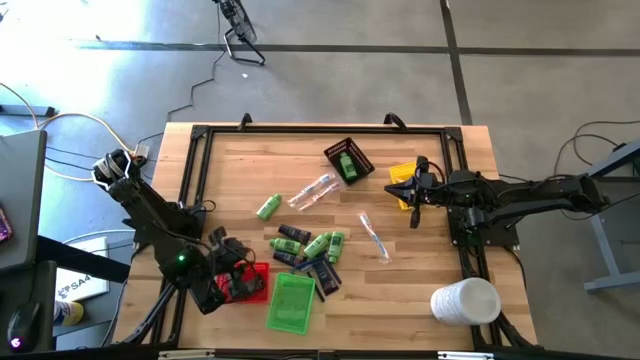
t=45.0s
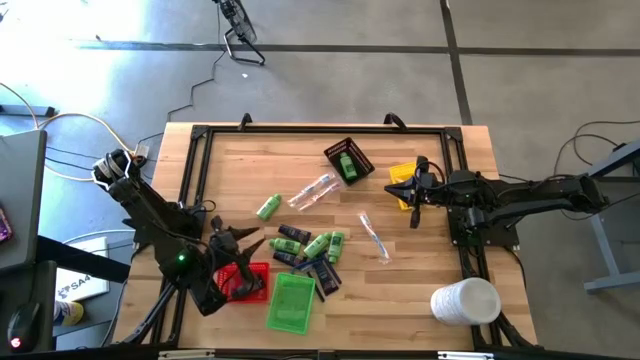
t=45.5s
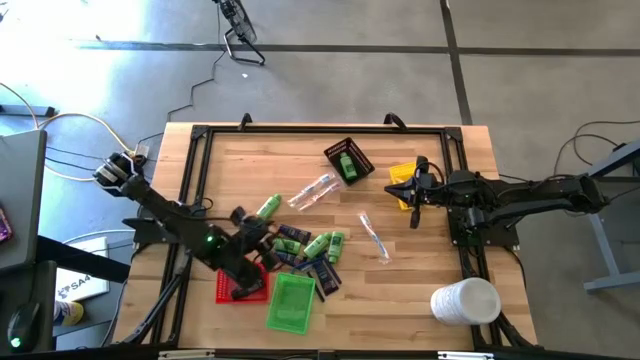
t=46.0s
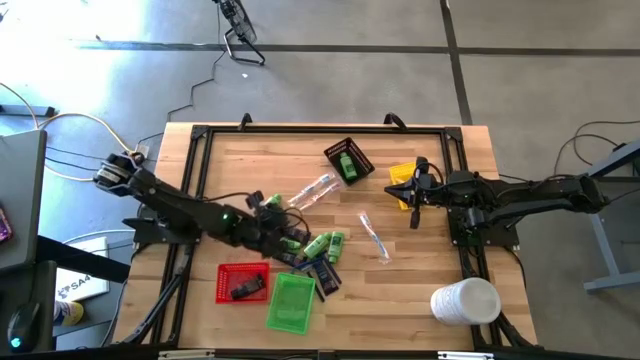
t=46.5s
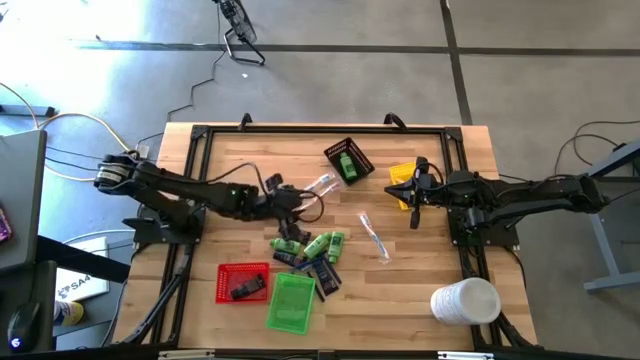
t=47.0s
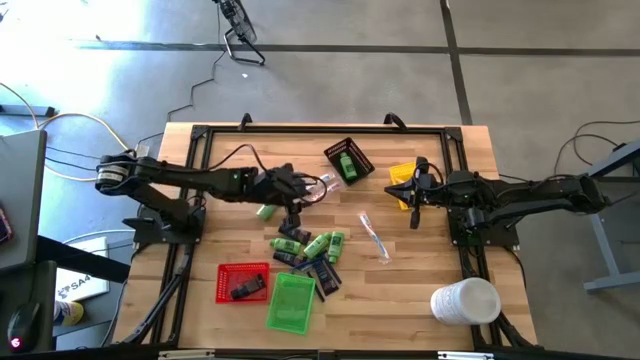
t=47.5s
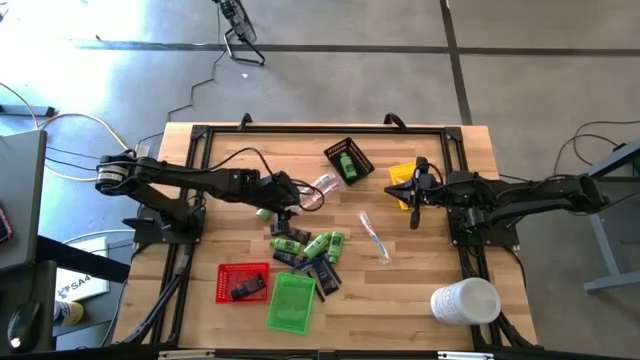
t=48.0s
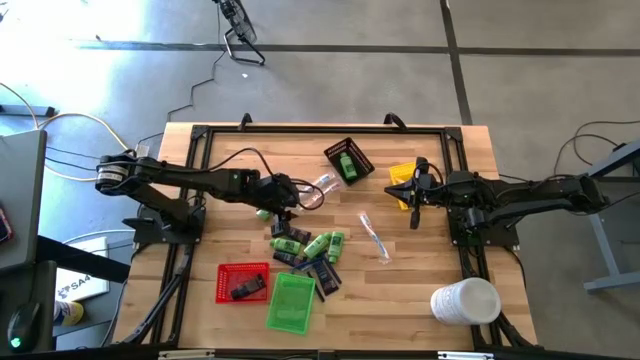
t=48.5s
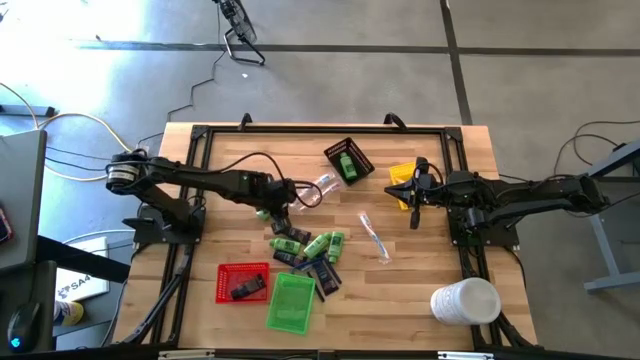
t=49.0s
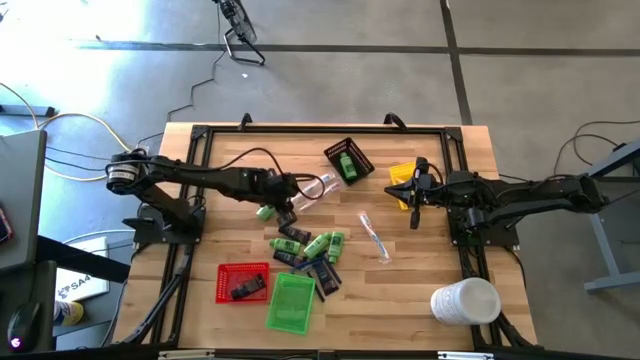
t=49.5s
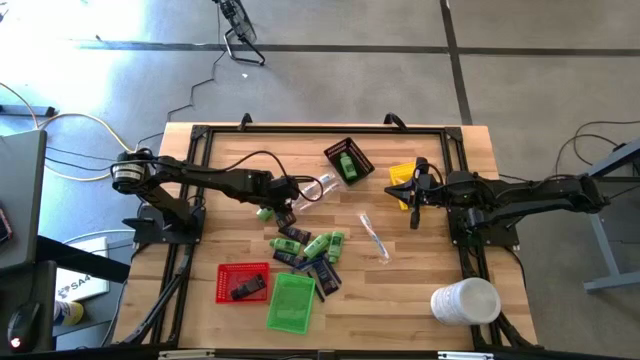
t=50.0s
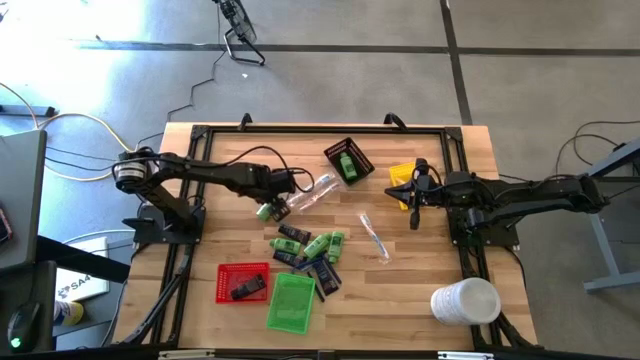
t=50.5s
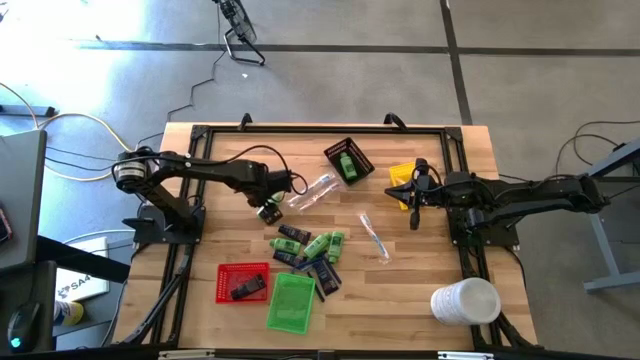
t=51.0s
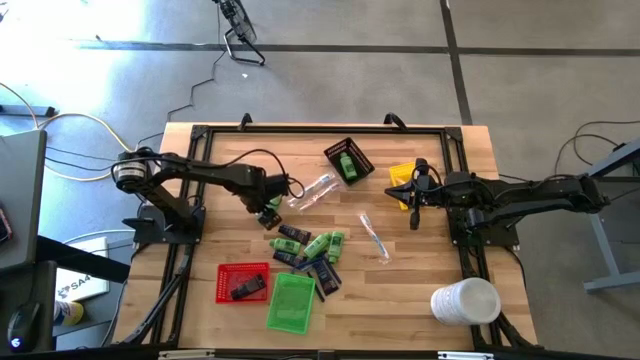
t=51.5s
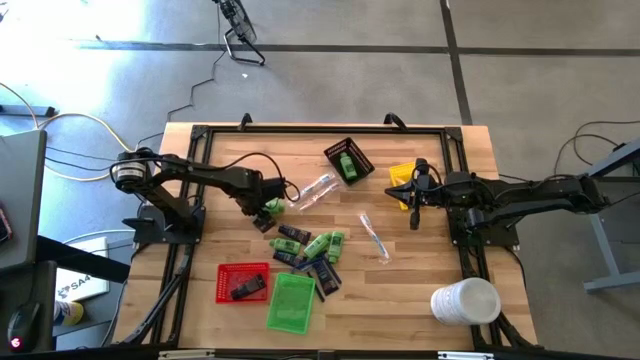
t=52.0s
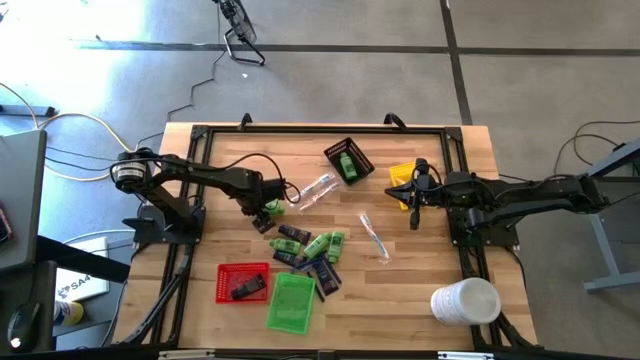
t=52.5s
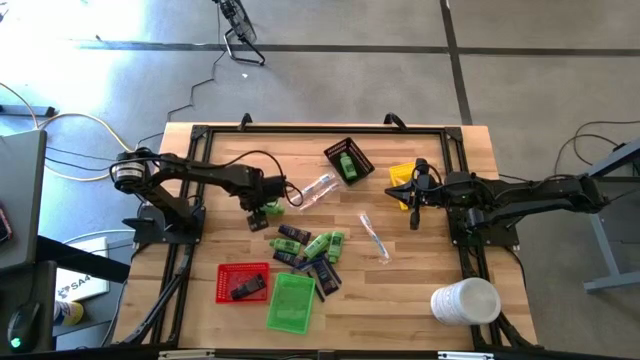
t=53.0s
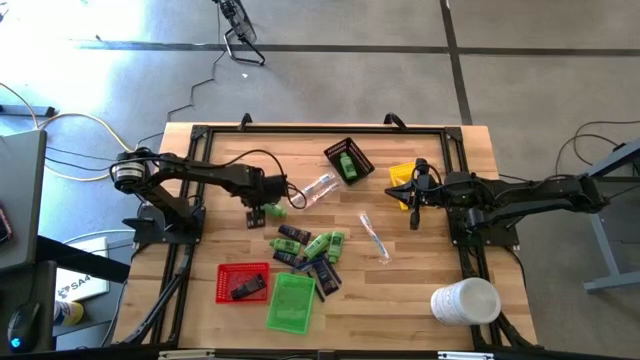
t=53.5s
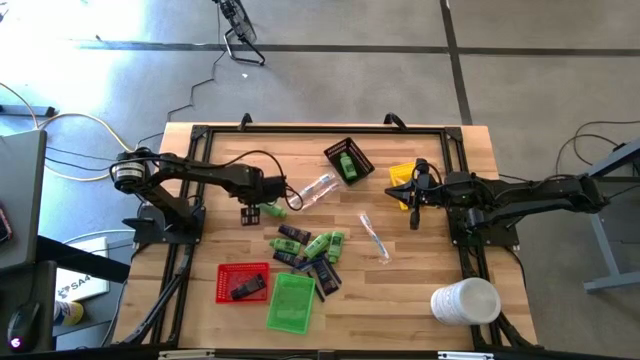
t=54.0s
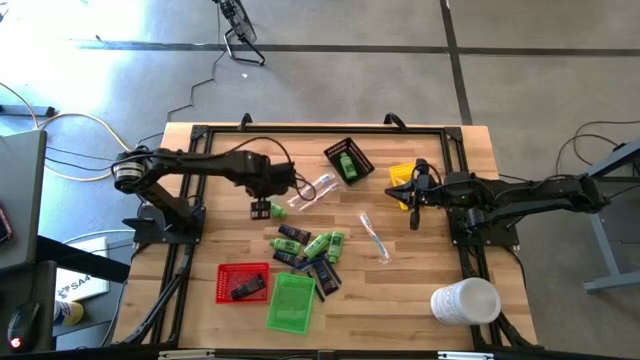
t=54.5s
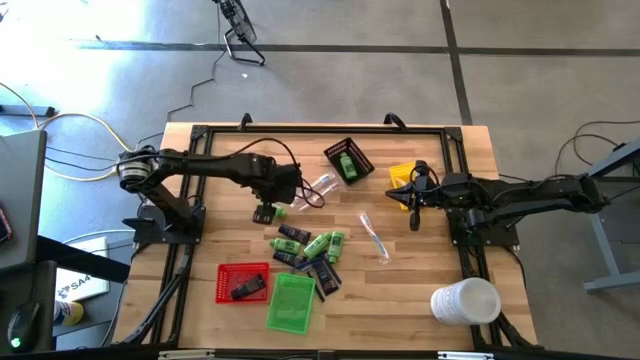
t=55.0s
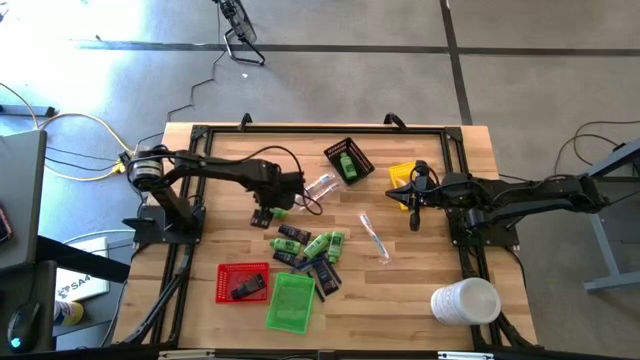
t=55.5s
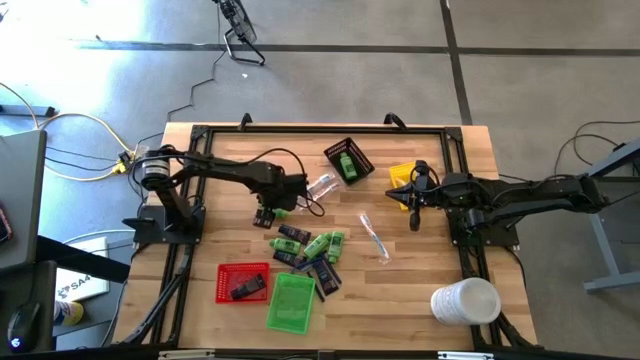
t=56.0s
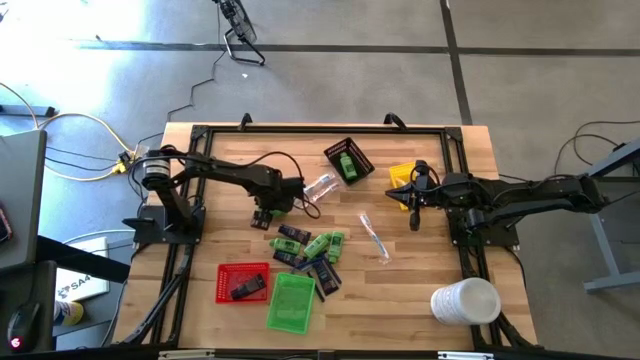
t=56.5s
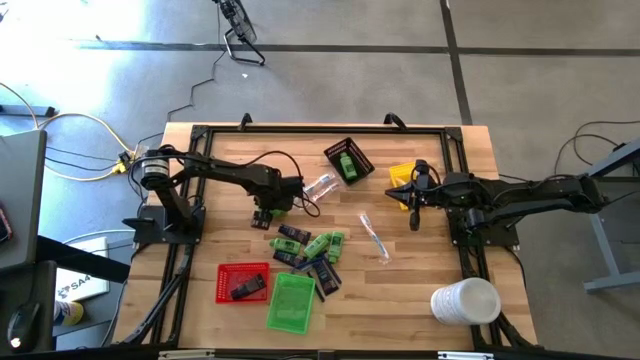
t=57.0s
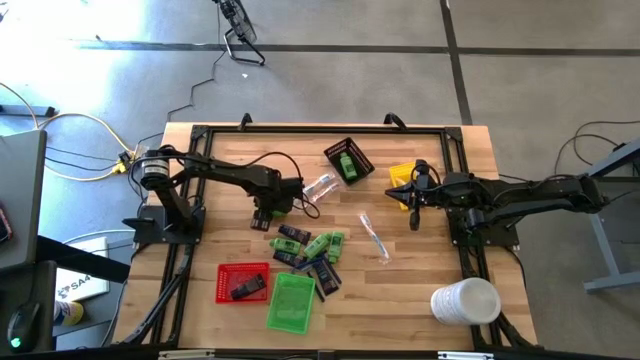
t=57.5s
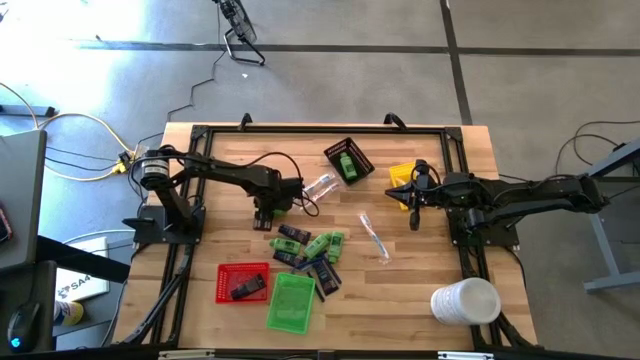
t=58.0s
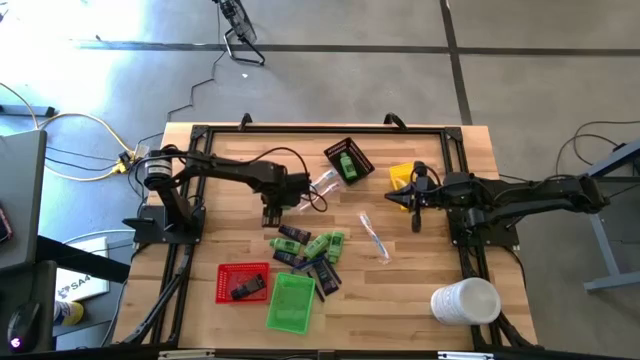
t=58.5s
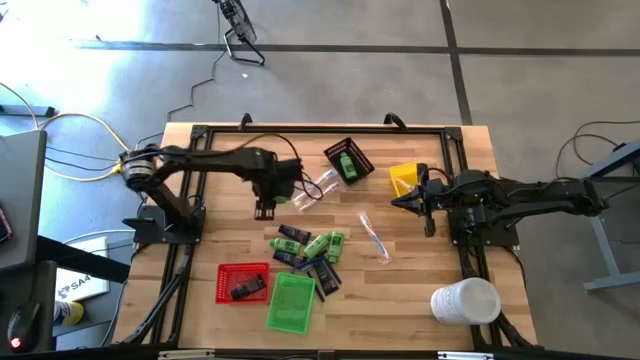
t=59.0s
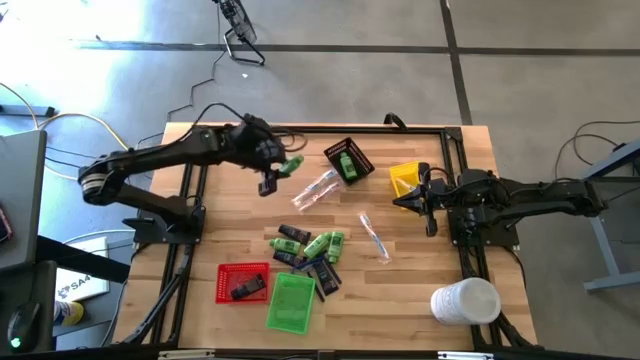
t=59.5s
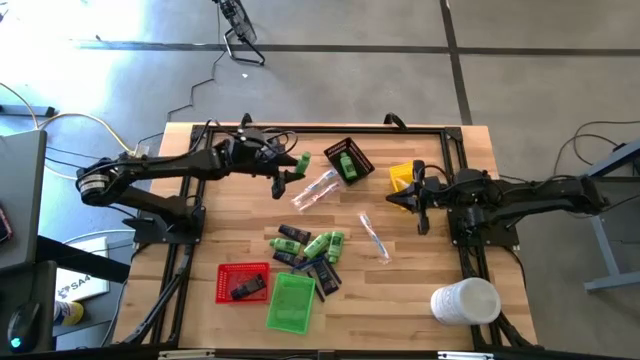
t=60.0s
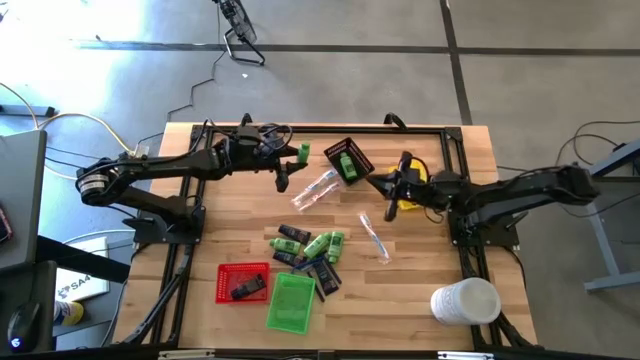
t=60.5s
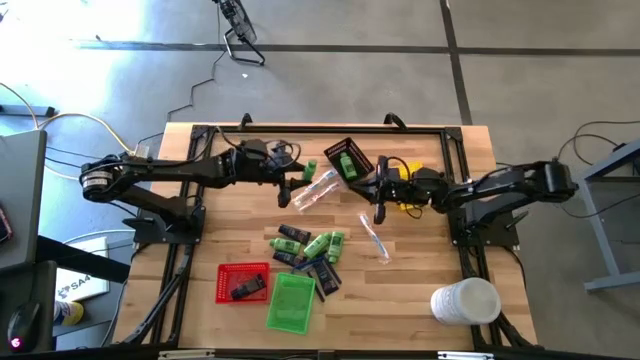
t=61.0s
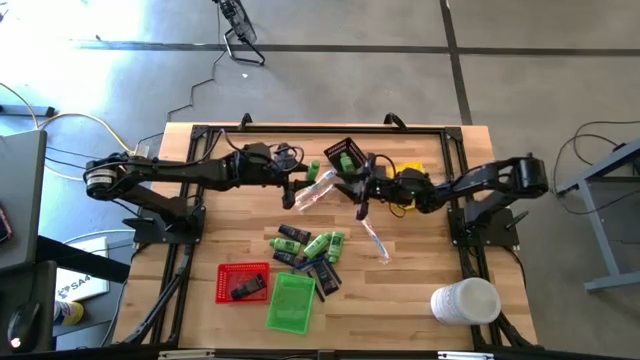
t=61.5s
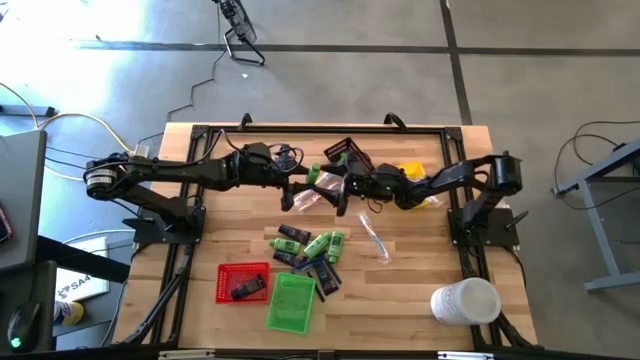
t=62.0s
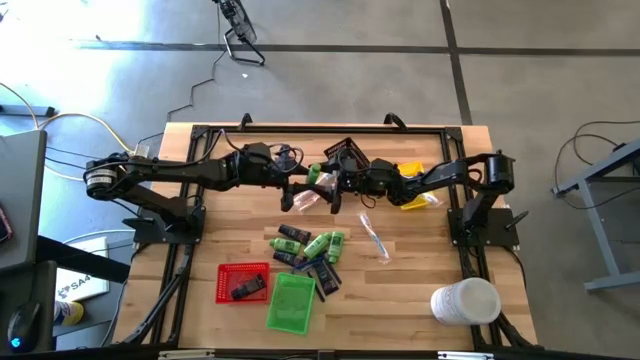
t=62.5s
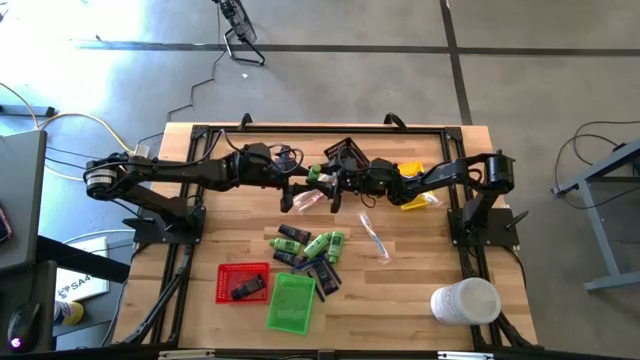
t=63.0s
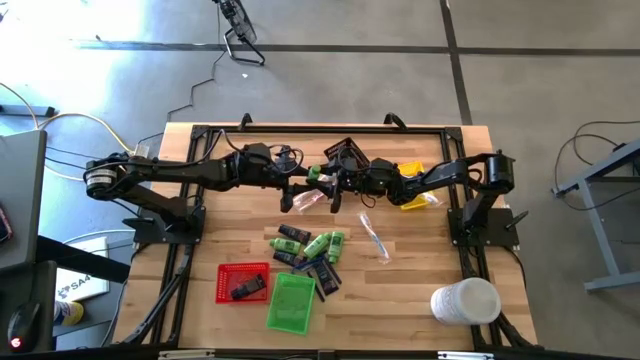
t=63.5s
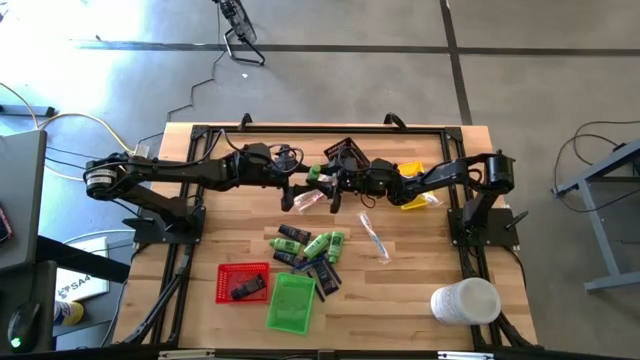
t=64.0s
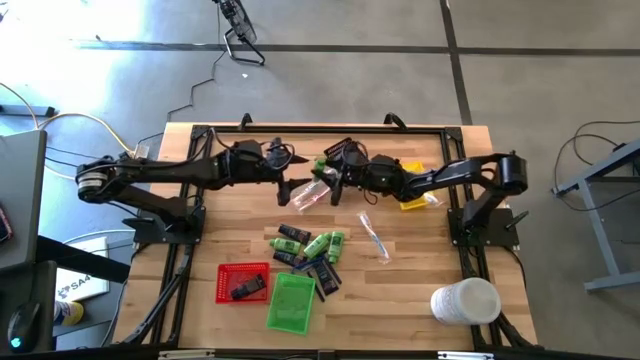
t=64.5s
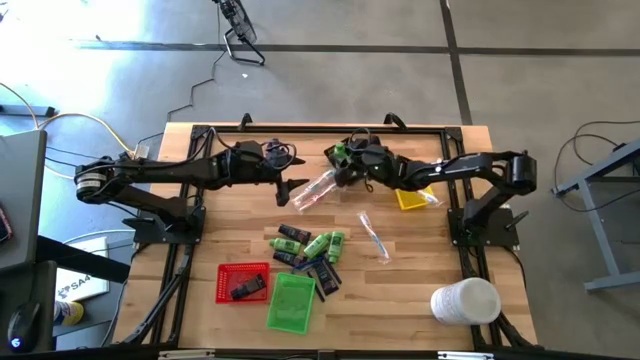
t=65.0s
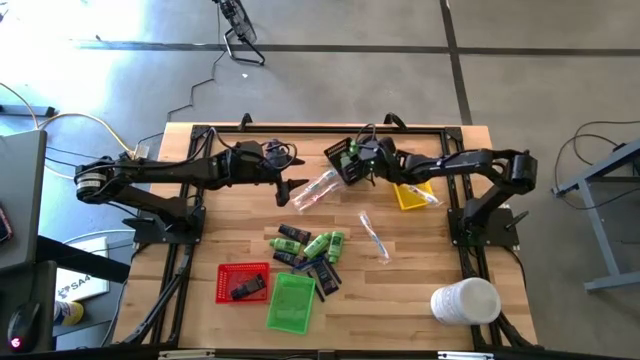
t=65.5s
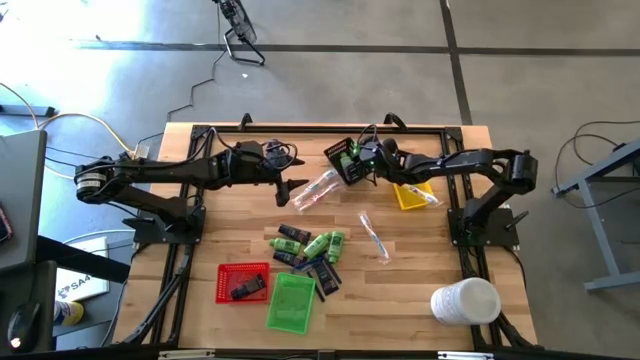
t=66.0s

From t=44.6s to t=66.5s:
Task: Pick & Place Travel size toiletries
Put the shampoo into the black bin

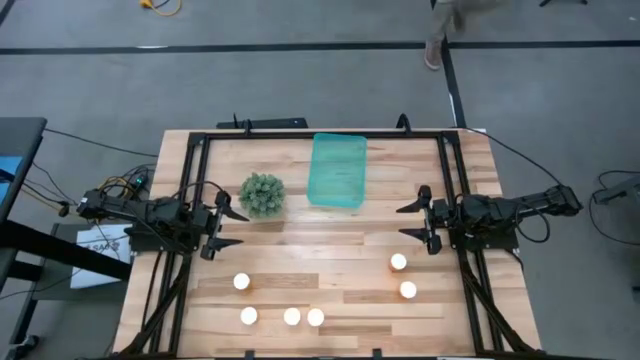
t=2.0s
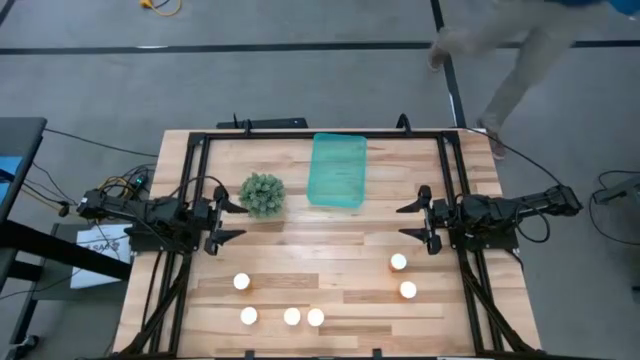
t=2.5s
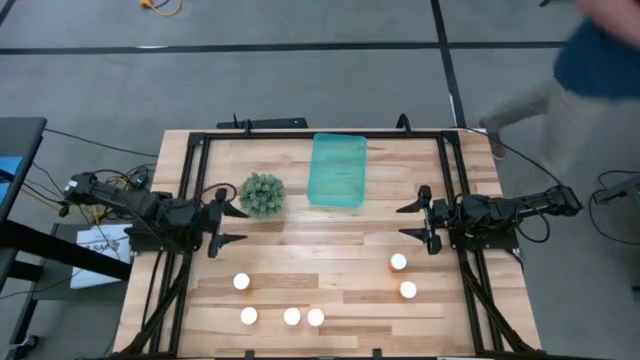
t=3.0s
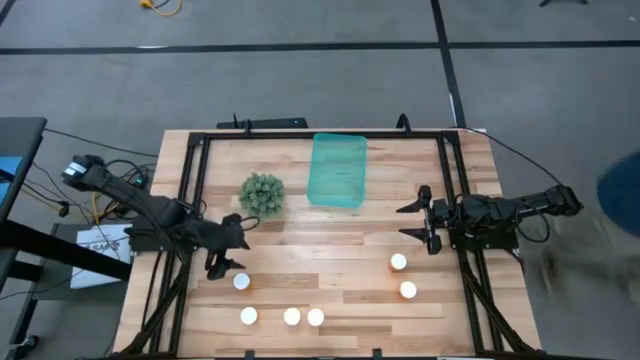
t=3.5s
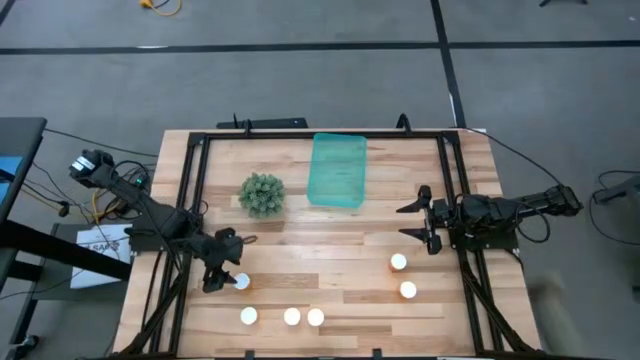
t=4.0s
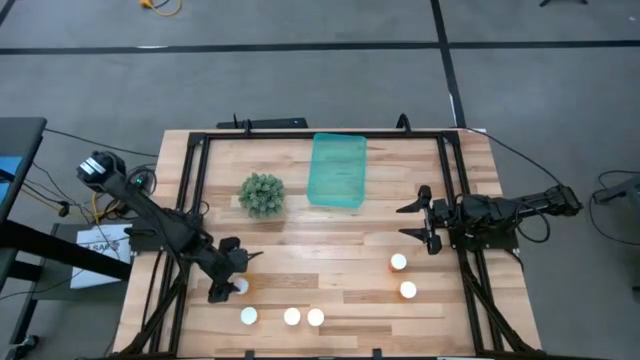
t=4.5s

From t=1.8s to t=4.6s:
Task: Pick and place pill bottles into a basket
Put the orange pill bottle into the green bin
